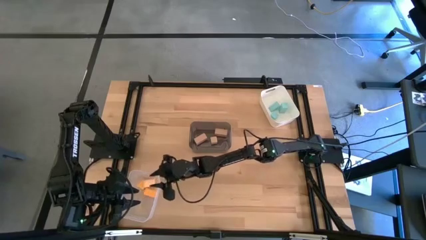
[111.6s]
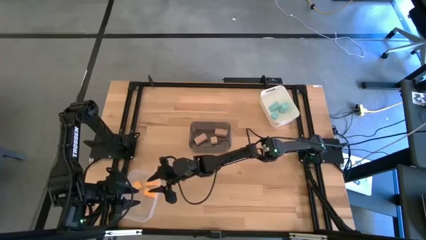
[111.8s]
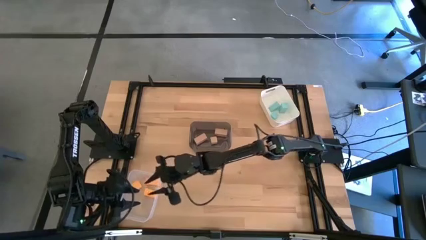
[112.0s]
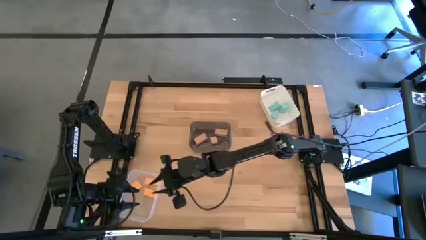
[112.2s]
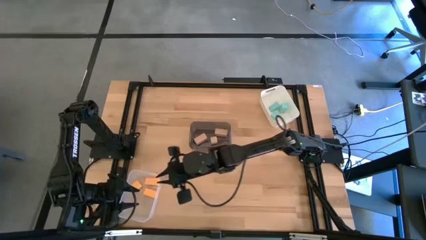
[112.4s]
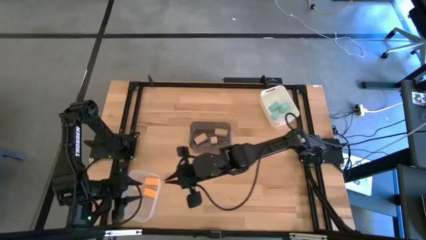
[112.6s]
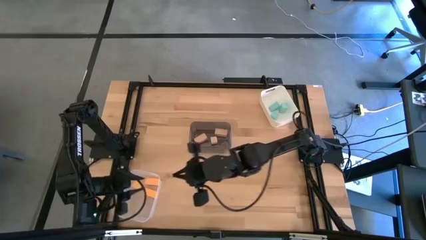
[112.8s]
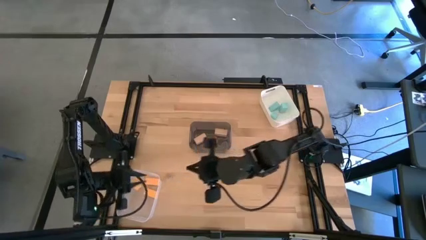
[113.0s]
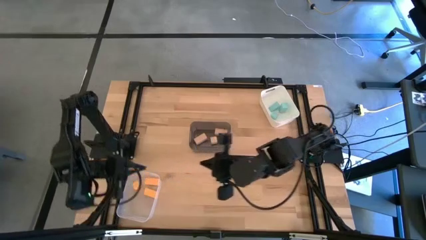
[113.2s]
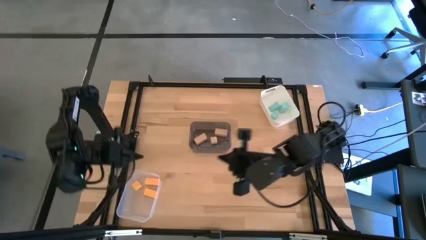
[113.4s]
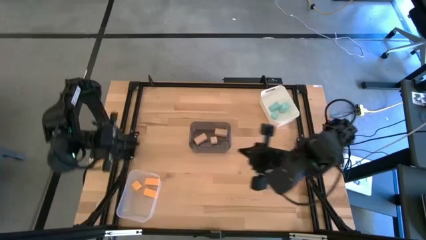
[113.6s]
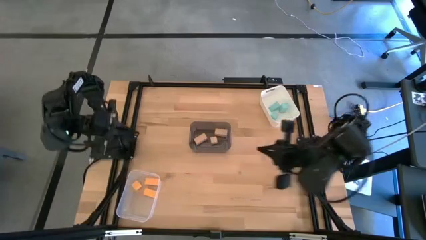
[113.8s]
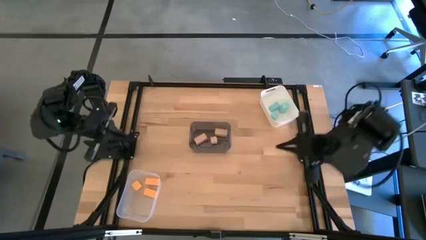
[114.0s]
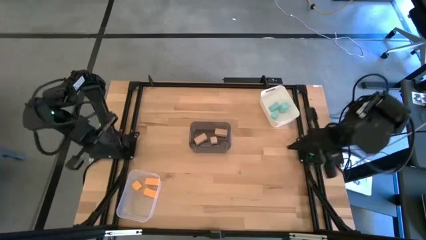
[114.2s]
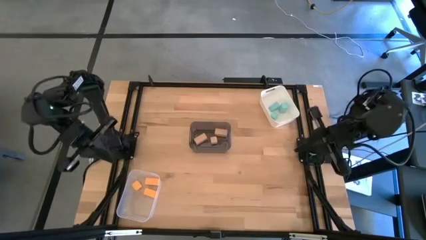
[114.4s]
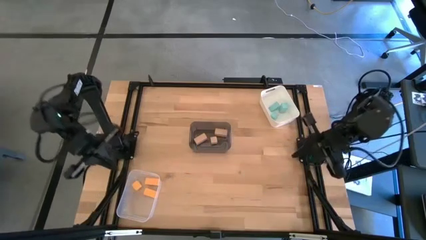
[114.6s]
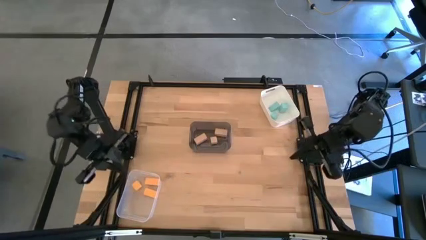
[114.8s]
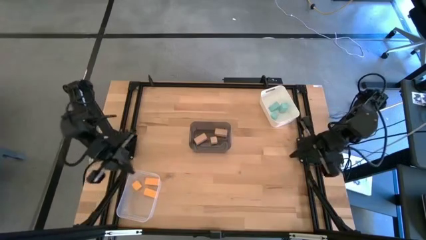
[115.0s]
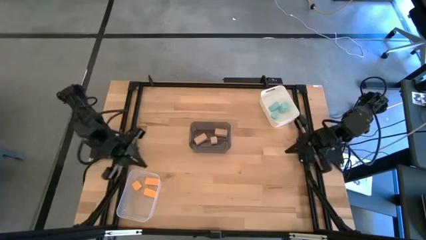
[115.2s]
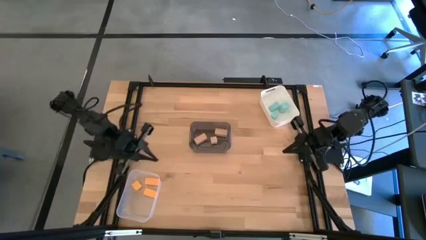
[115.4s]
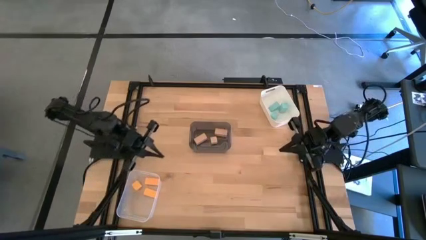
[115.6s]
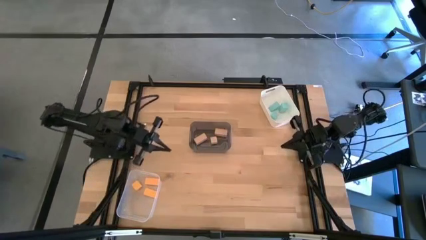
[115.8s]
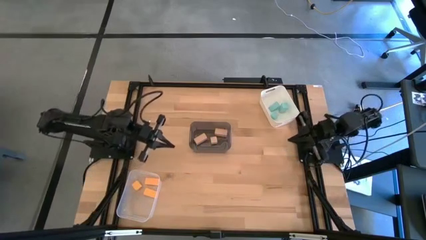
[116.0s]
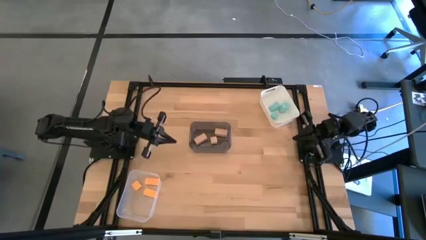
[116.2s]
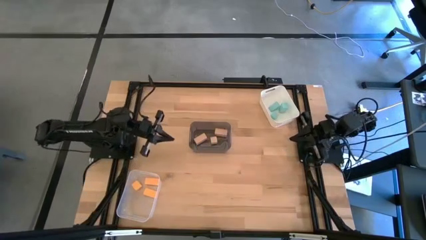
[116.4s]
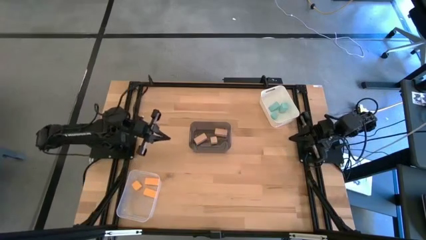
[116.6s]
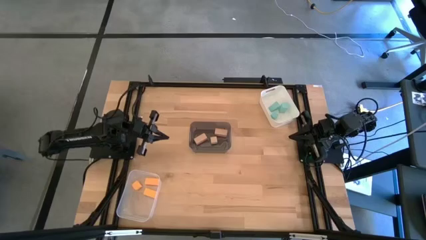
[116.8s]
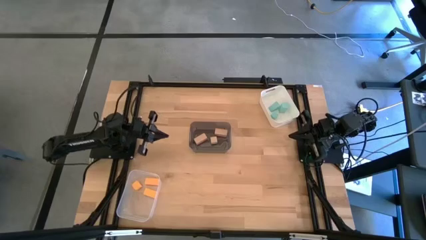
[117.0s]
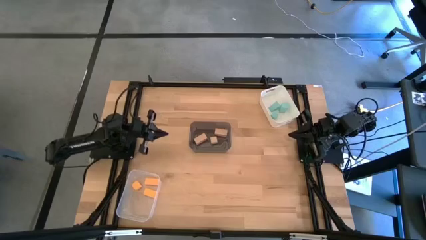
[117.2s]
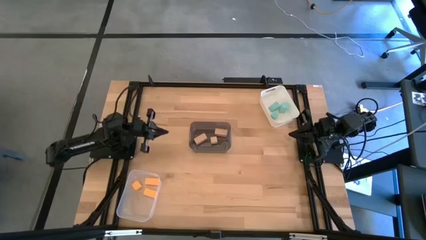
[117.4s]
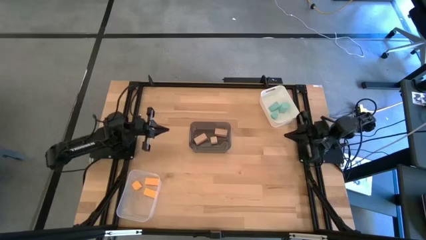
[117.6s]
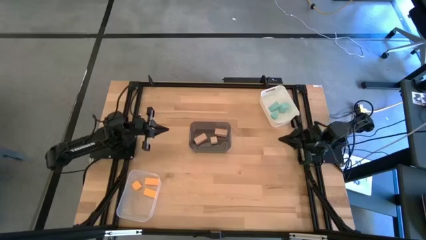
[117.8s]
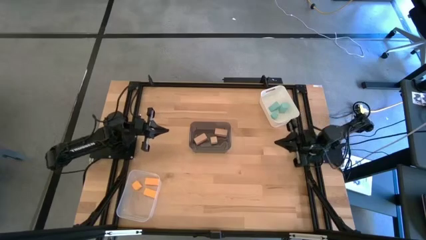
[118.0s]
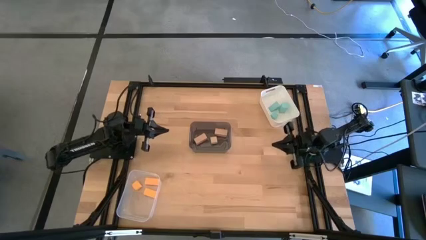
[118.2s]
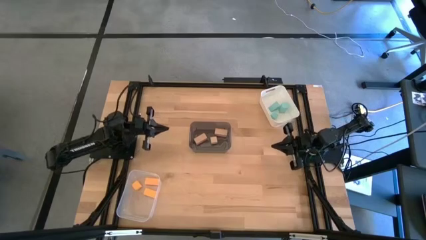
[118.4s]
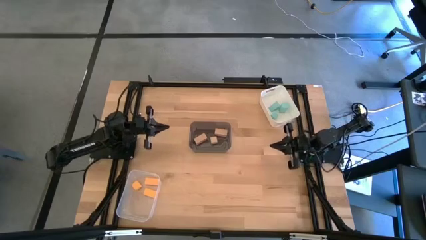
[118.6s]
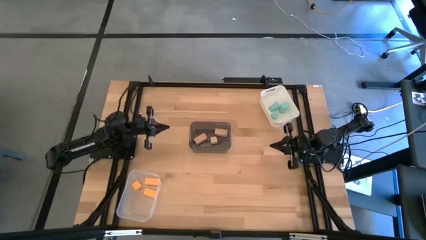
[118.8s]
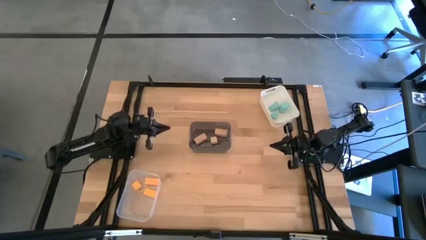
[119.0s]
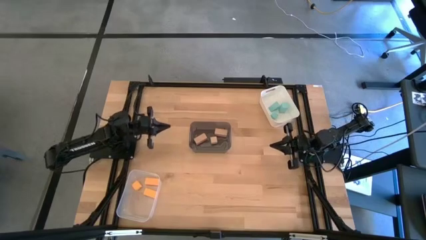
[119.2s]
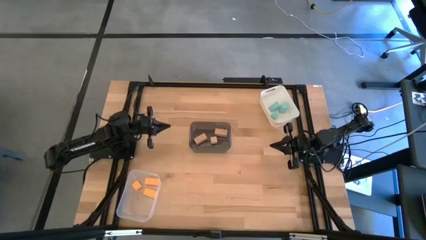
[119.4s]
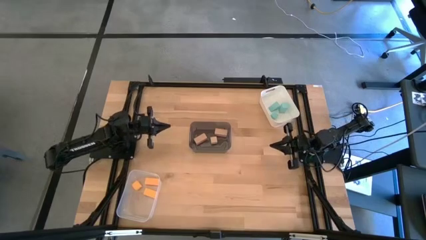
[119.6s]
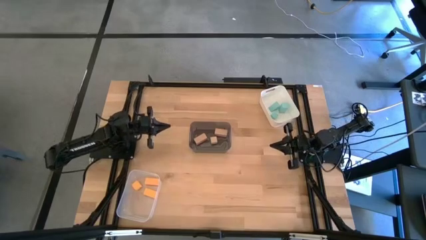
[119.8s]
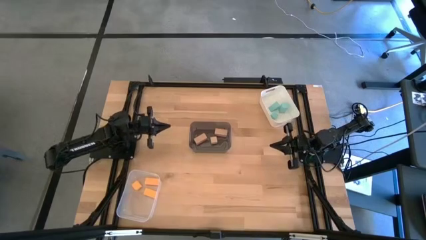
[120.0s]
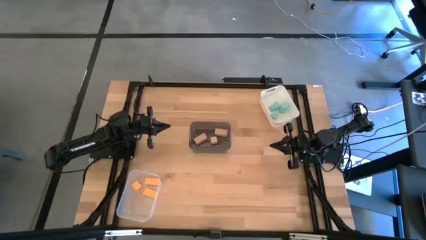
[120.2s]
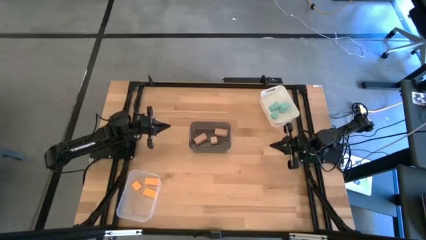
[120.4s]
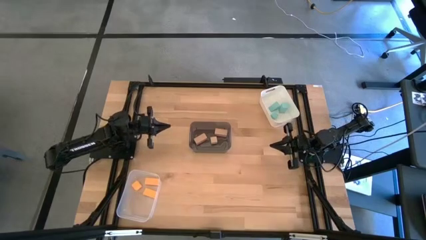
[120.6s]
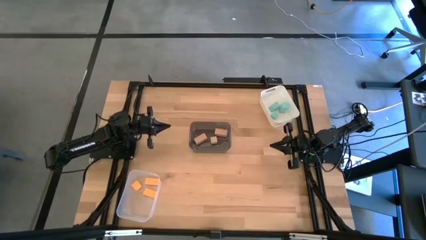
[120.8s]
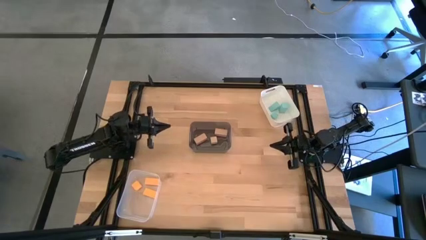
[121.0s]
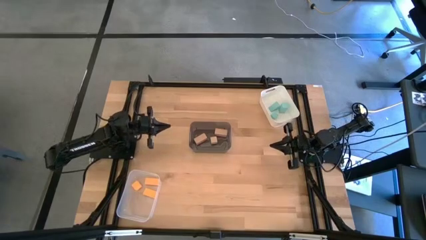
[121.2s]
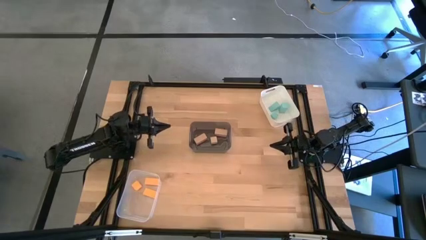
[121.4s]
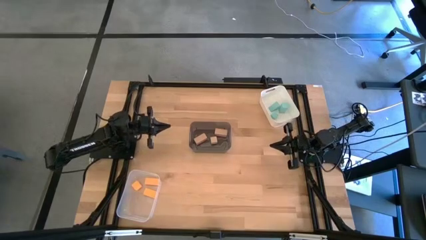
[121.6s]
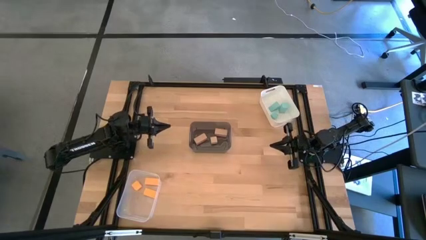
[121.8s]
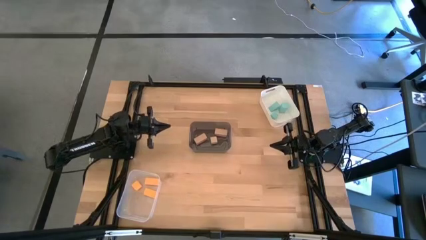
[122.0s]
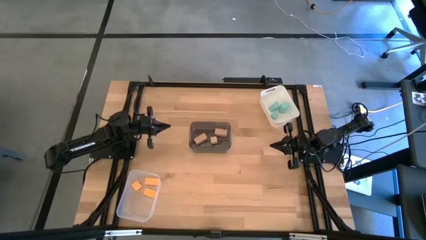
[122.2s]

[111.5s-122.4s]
Task: Sort & place blocks by color
Return to Home Position
